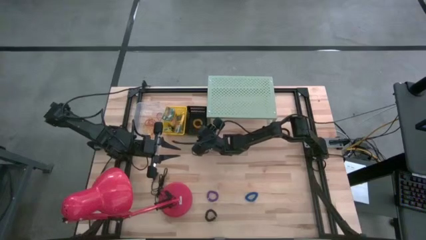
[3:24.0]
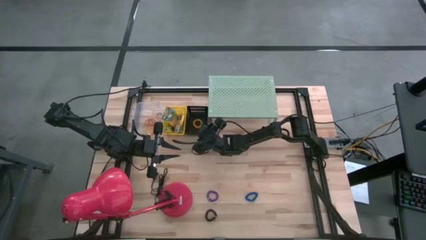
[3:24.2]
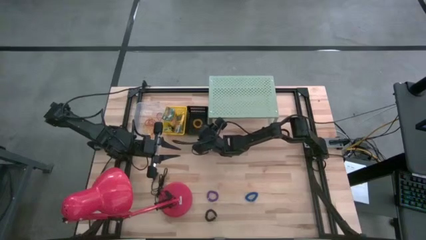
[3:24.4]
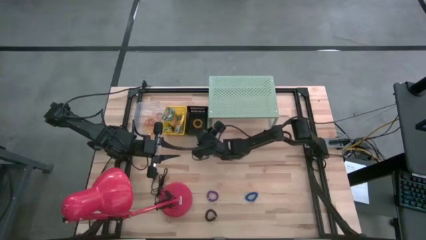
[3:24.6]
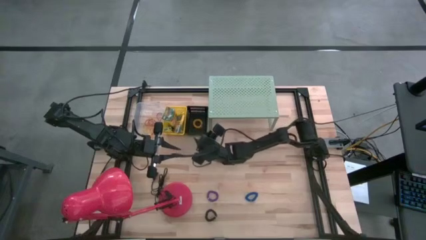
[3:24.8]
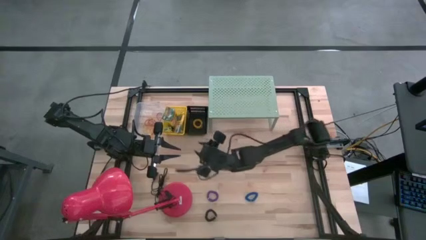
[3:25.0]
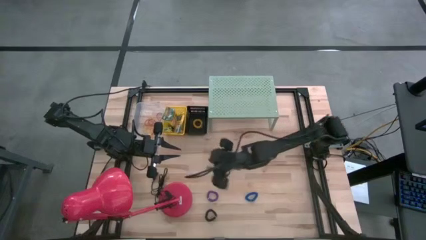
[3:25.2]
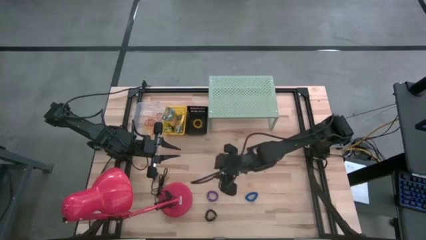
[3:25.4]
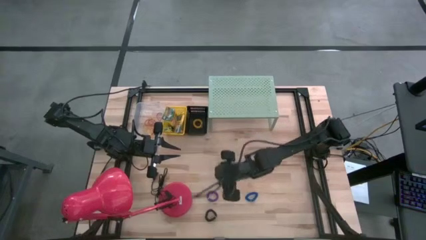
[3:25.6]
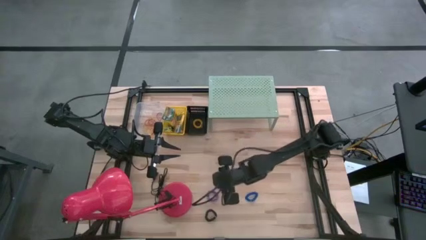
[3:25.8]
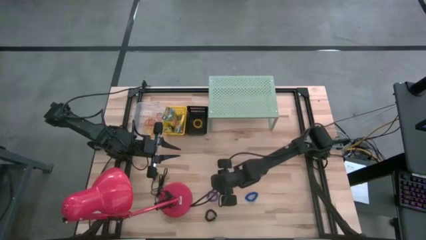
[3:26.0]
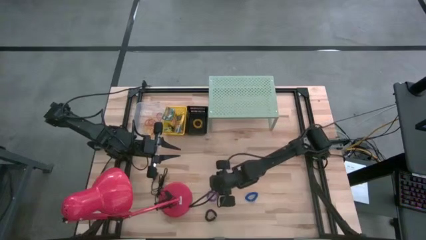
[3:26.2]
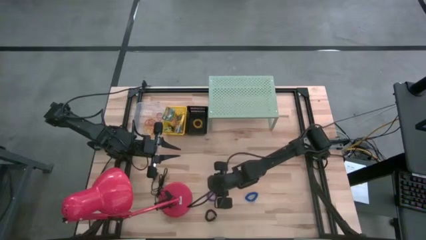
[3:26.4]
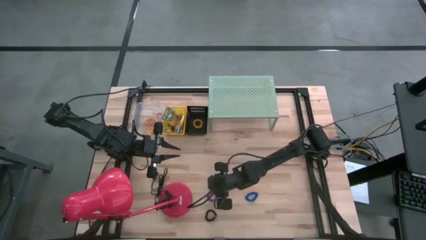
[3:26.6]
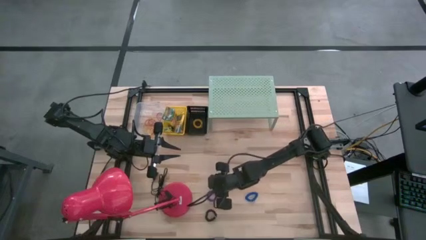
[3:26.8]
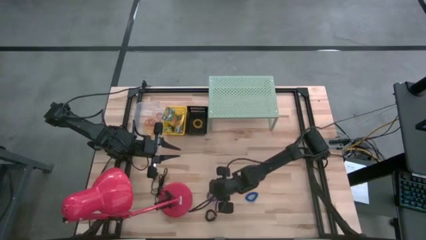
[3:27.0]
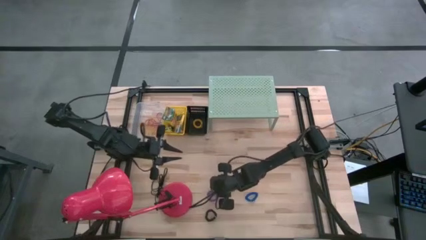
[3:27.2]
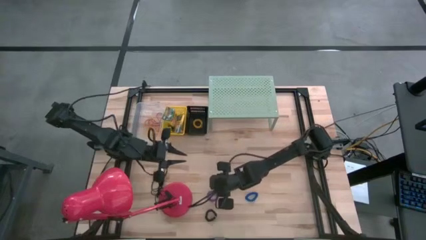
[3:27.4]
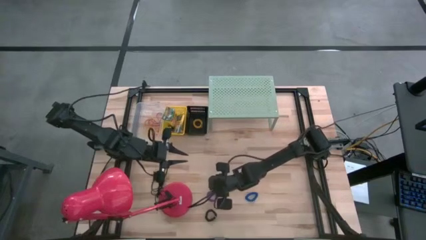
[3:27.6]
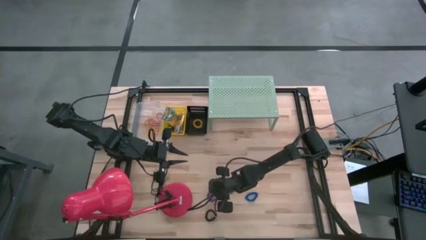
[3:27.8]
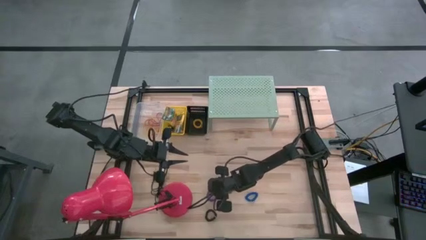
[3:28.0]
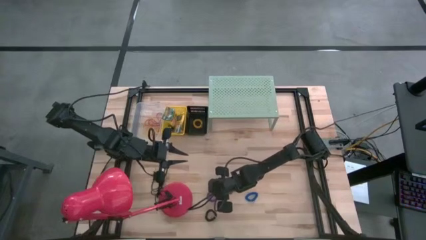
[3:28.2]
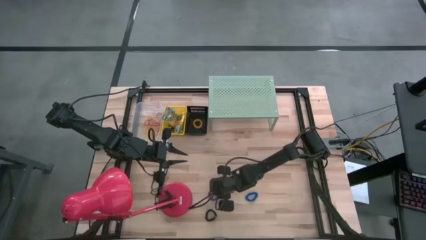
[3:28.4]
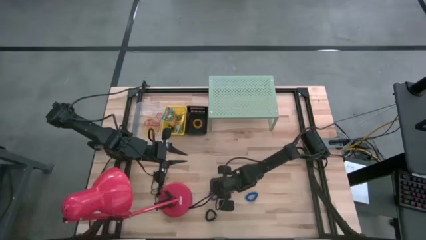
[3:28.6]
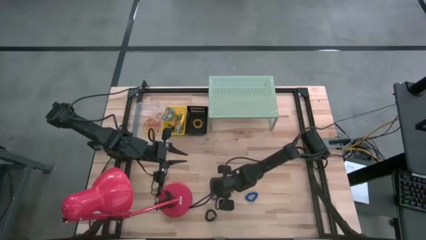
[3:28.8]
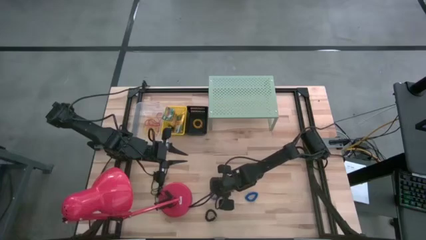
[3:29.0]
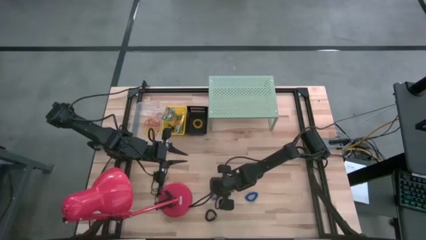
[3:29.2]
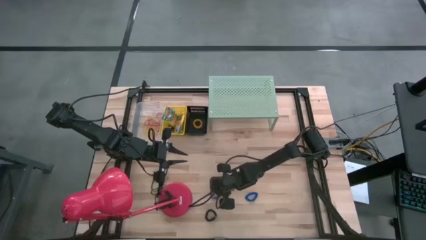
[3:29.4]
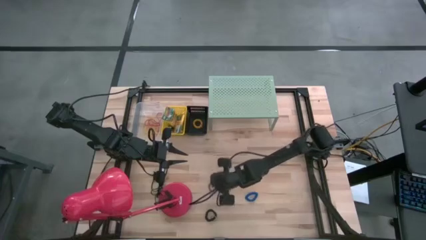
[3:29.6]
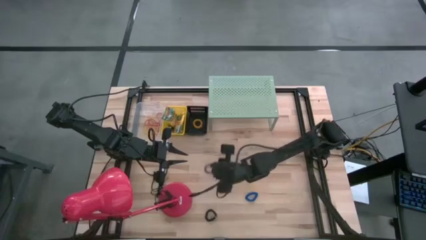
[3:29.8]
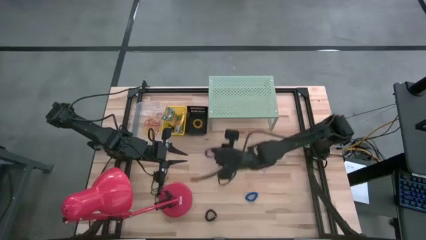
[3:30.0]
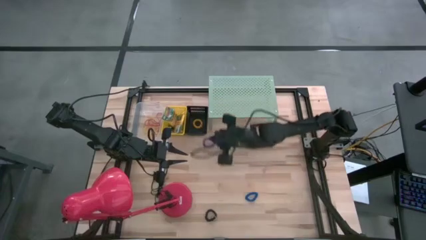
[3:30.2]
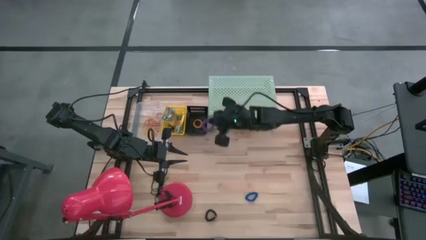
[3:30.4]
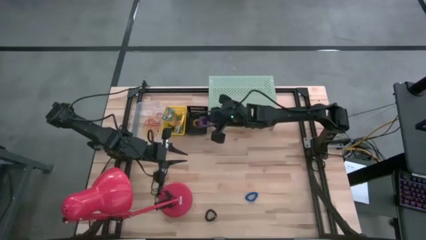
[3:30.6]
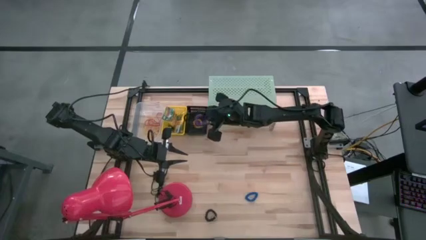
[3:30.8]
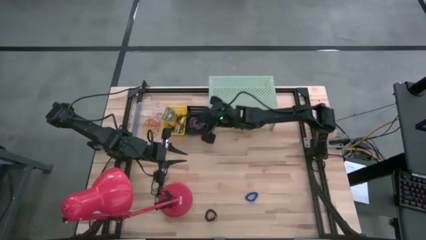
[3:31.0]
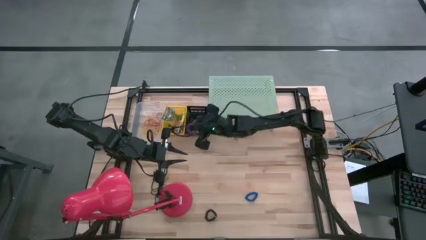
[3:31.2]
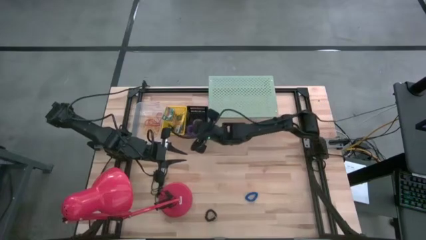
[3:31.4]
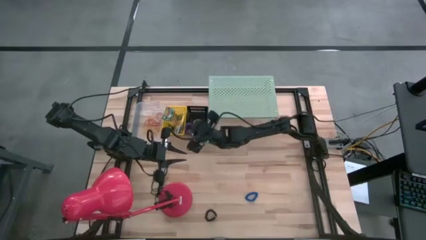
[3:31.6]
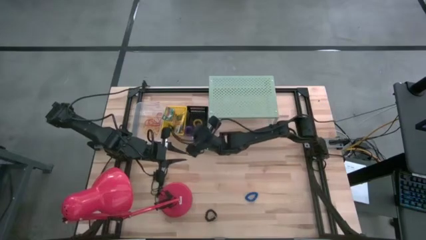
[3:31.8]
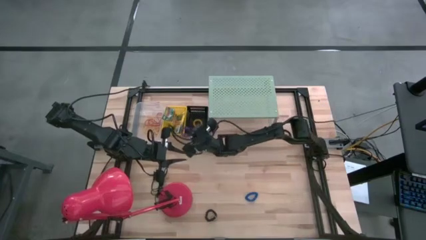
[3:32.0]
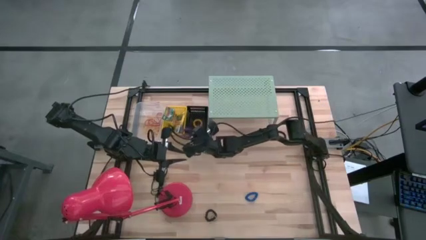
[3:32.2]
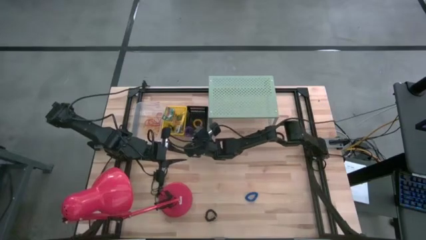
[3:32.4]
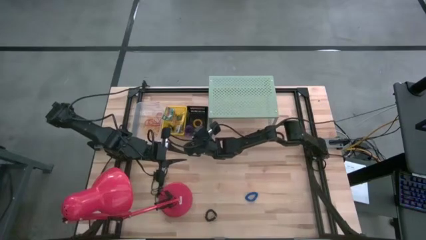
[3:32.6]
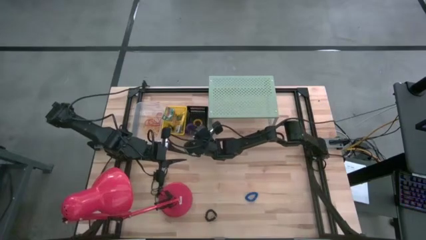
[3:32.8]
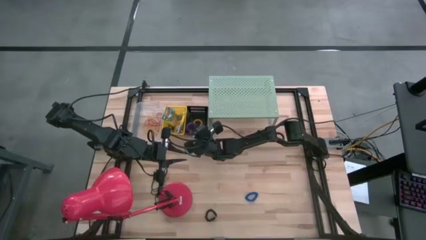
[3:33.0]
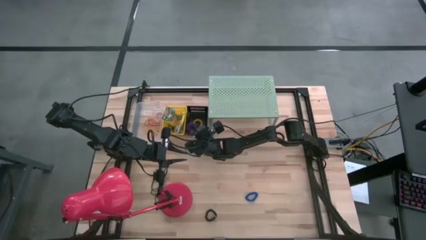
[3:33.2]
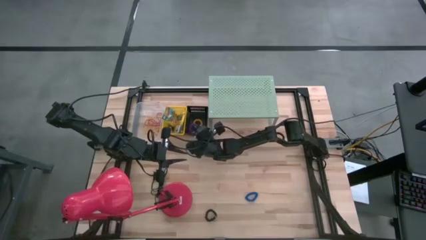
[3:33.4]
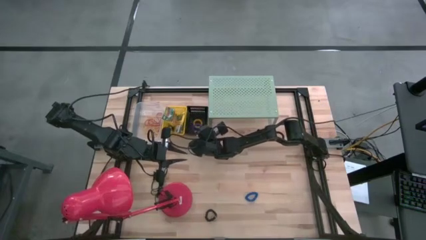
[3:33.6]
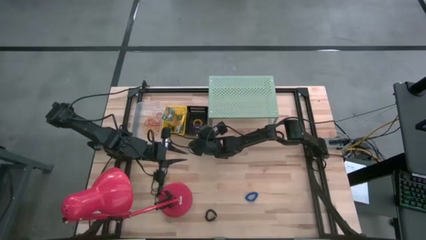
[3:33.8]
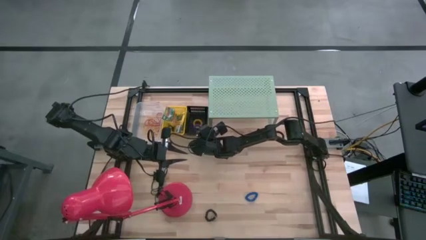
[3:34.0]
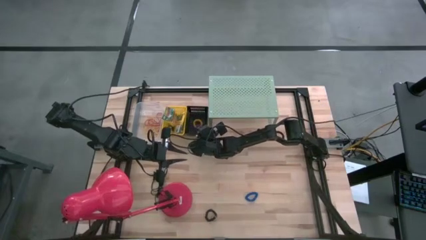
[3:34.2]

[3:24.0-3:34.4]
Task: Pick & Place Office Desk Supplies
Put the purple spring rubber band into the black bin
